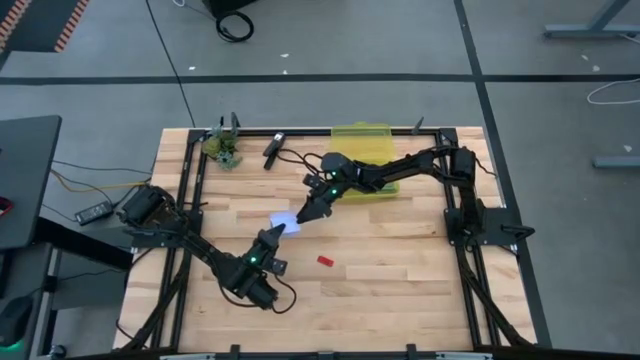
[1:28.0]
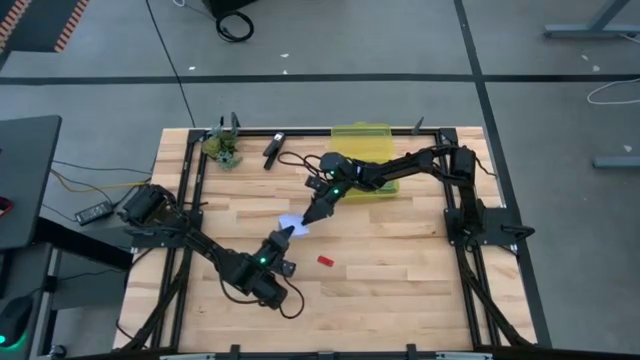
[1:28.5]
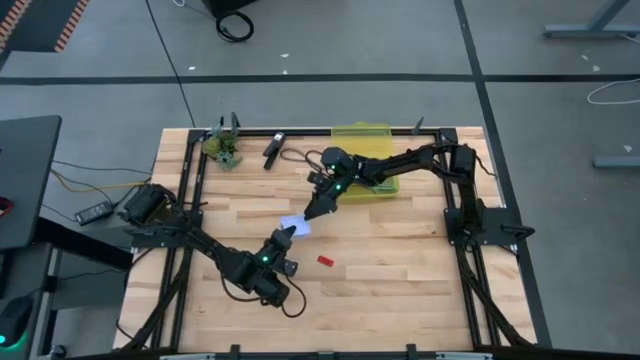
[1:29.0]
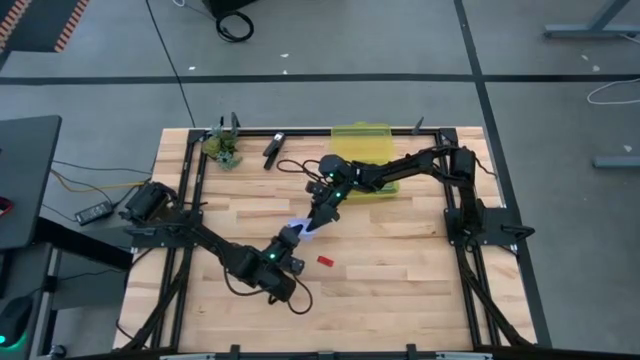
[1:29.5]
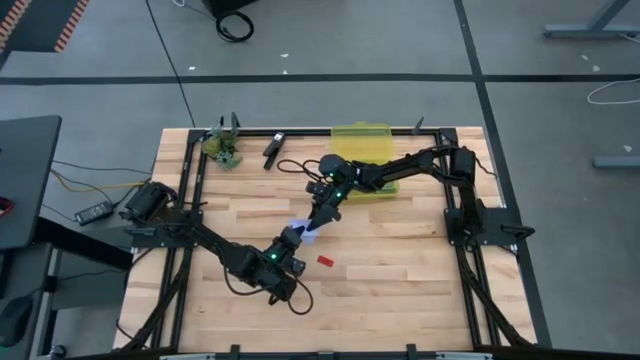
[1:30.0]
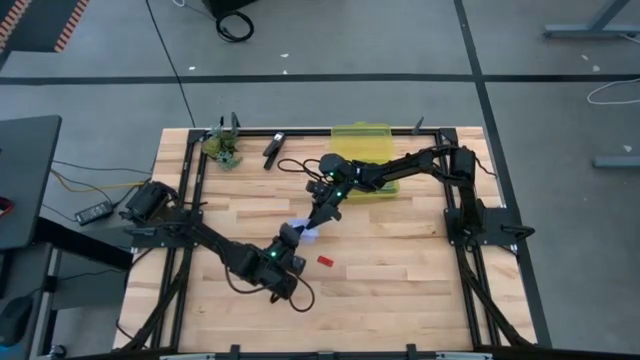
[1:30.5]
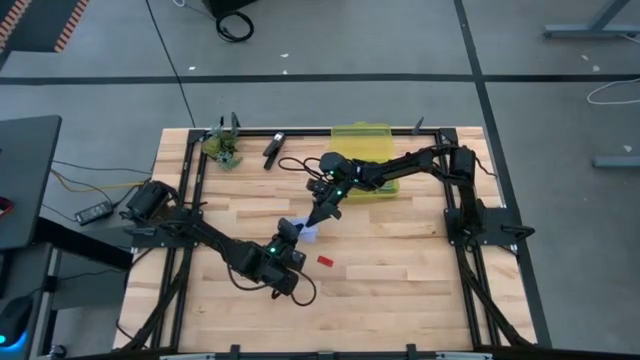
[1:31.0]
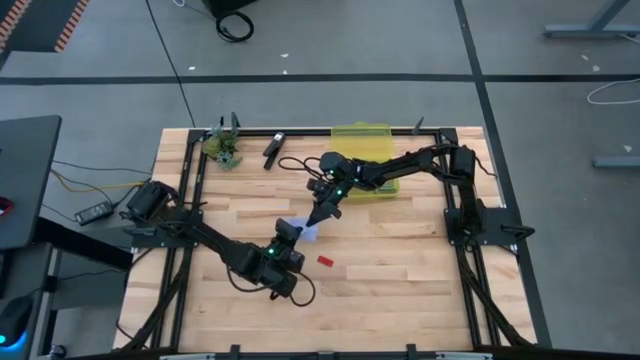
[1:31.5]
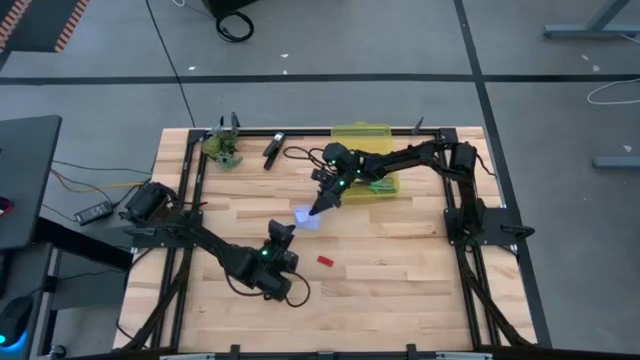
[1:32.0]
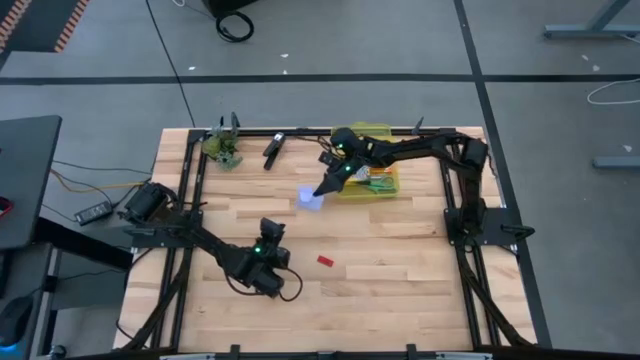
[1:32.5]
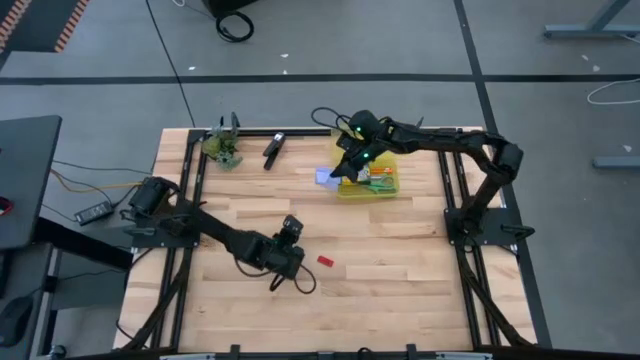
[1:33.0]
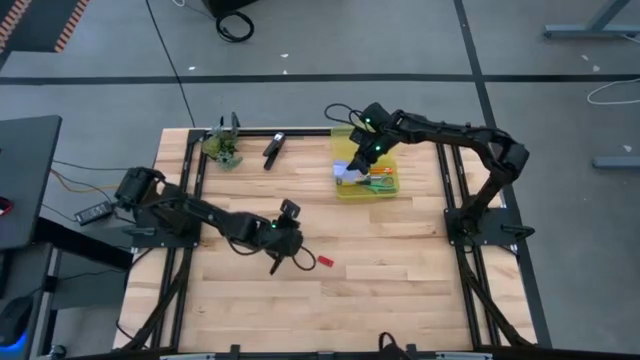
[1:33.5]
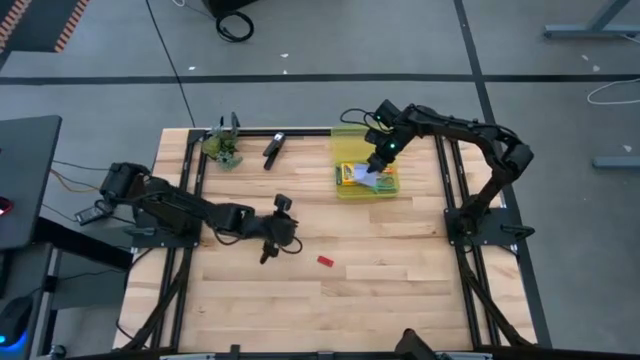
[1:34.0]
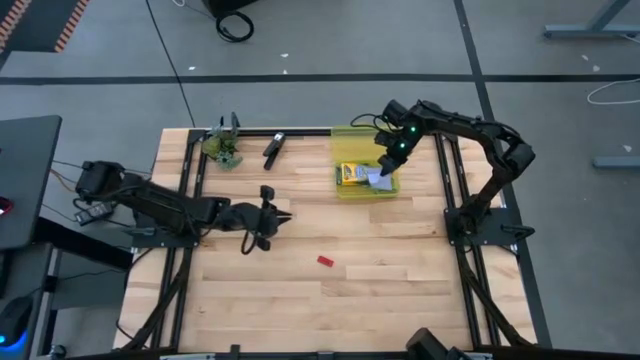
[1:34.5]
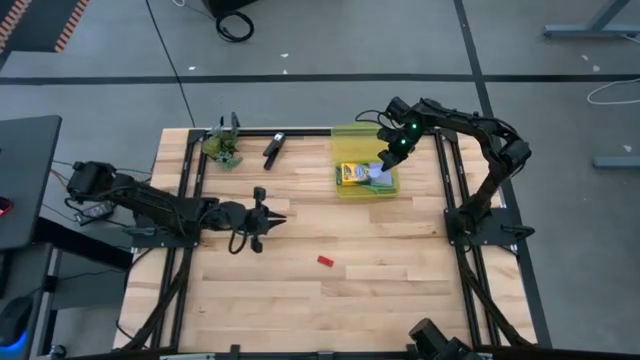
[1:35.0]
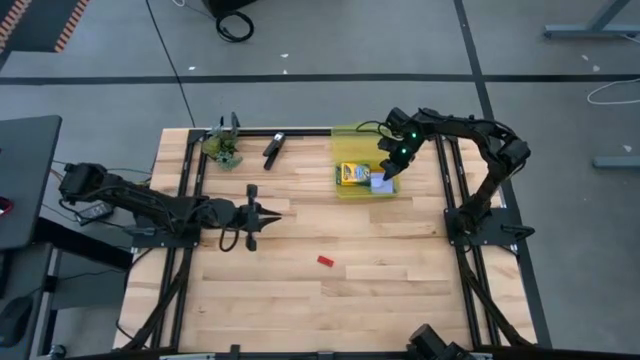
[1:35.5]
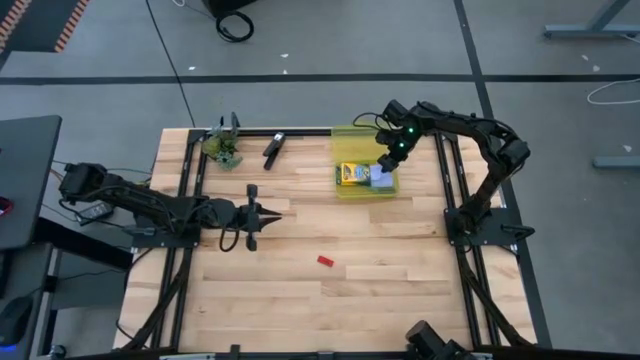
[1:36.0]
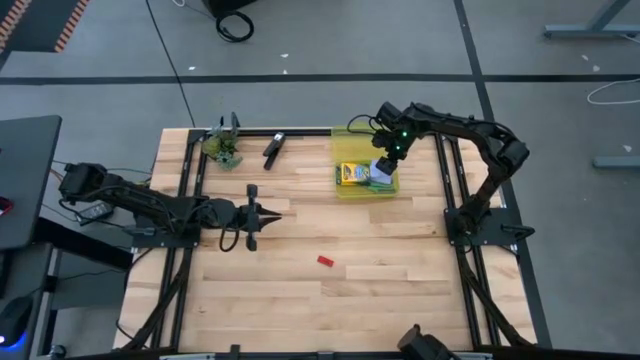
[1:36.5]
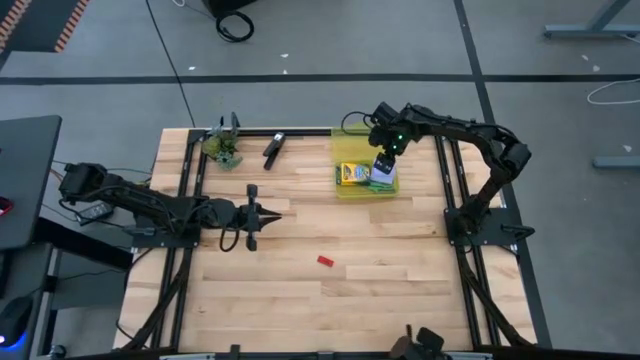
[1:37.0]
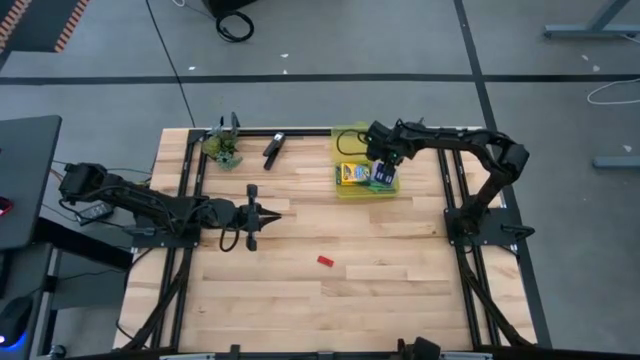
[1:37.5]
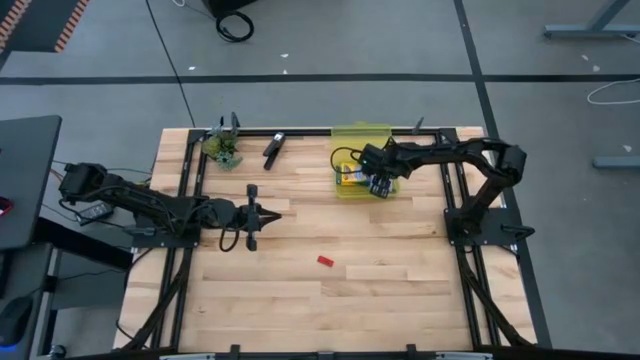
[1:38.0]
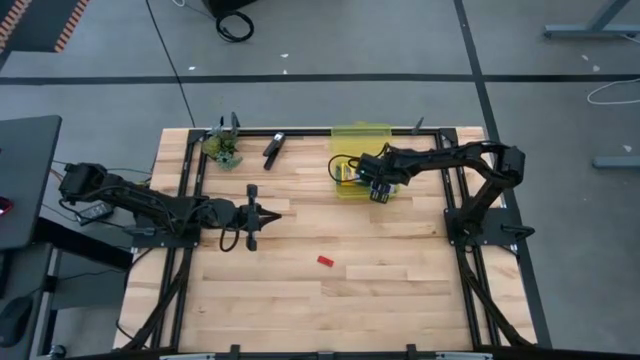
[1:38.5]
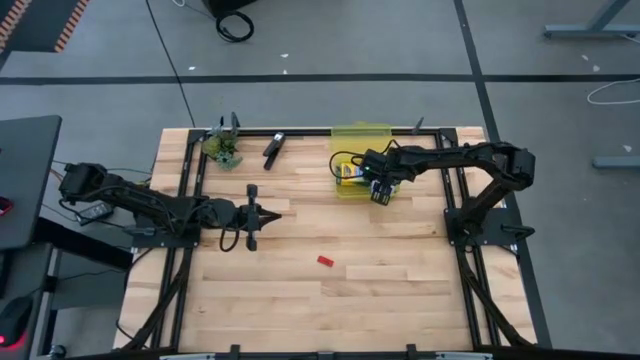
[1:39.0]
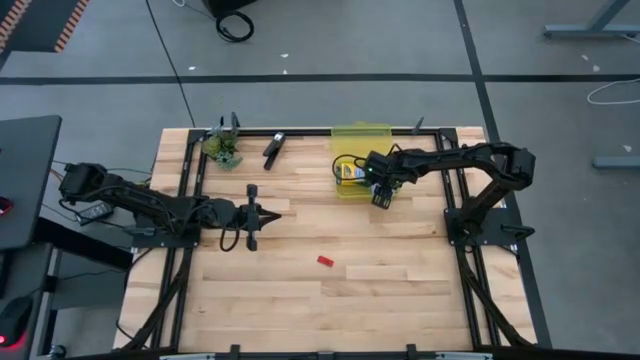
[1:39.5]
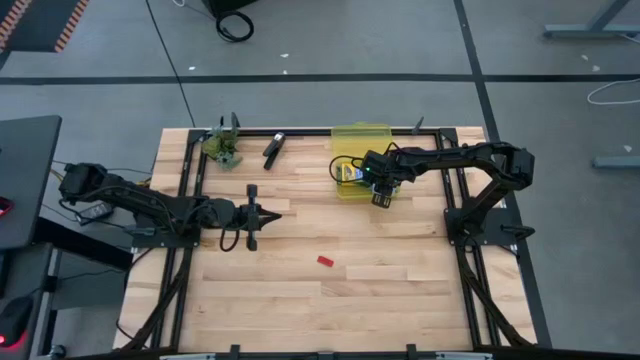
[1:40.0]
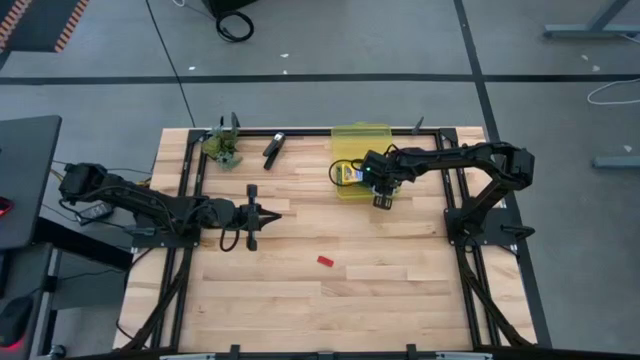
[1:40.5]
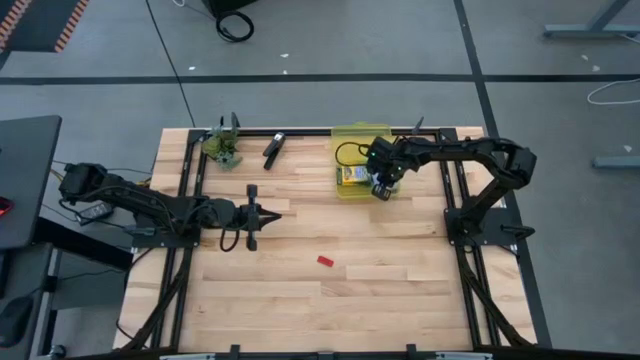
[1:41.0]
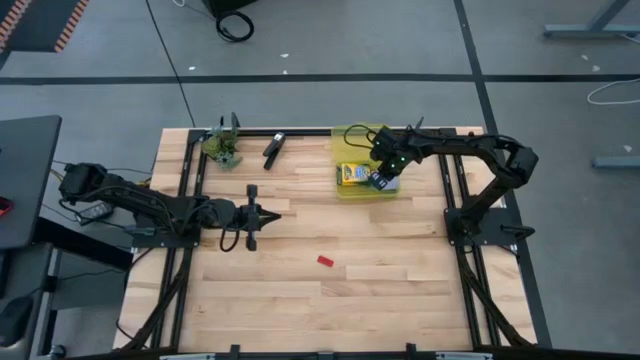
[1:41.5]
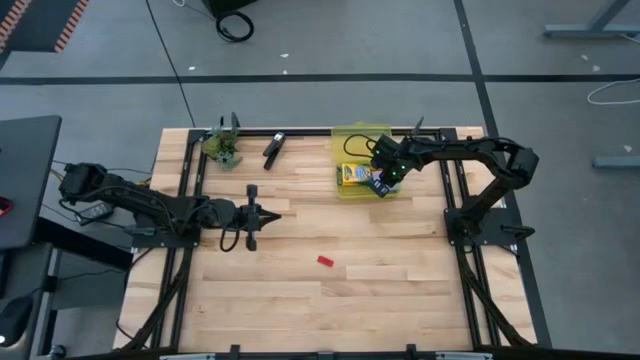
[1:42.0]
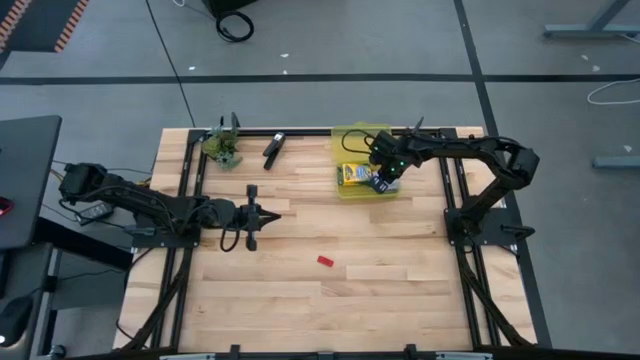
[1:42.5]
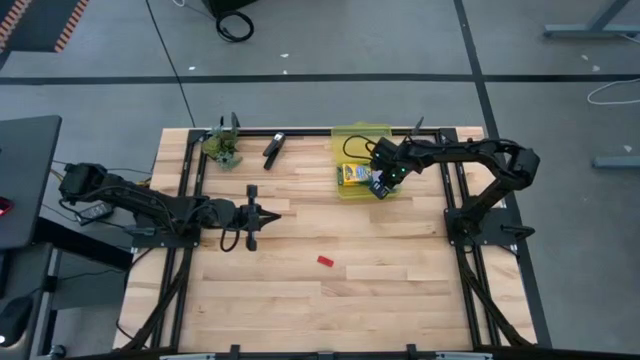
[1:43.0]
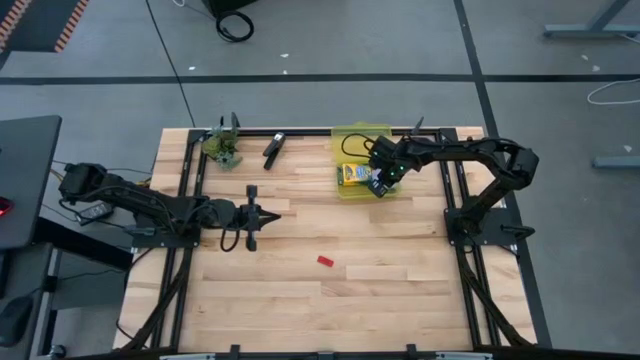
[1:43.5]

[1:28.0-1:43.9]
Task: Pack school essentials
Put the blue sticky notes into the yellow supply box

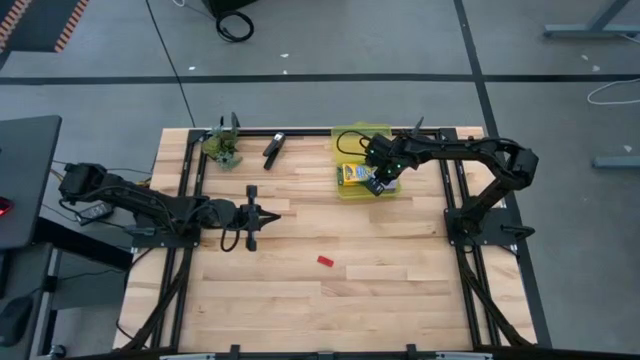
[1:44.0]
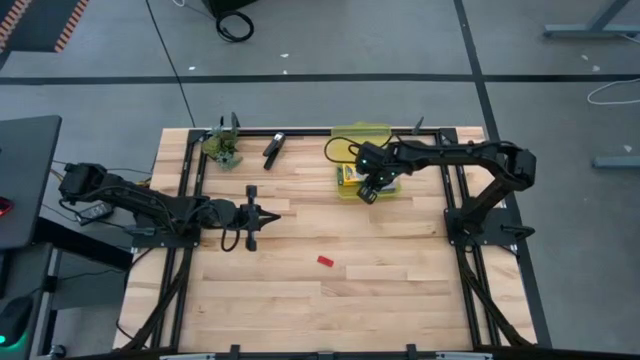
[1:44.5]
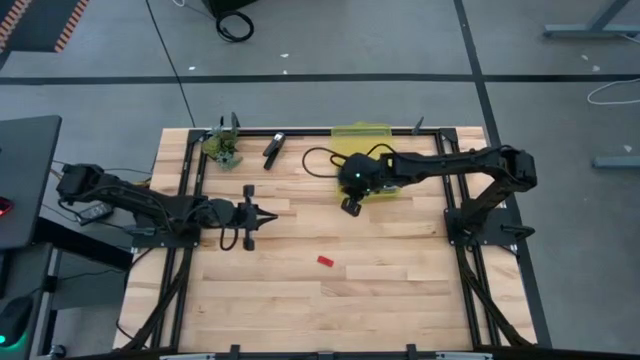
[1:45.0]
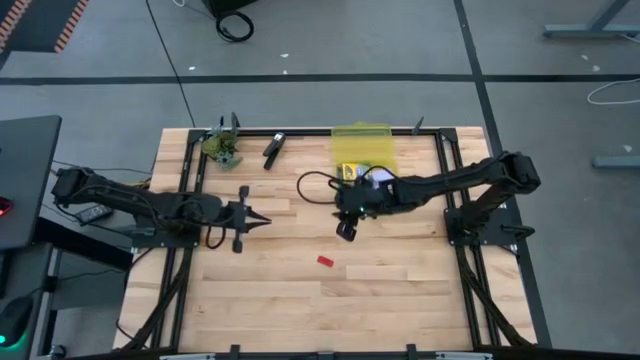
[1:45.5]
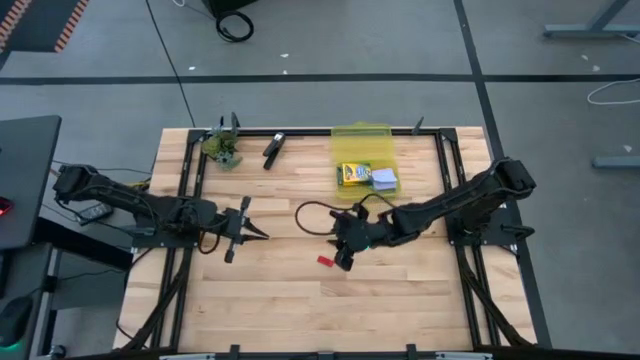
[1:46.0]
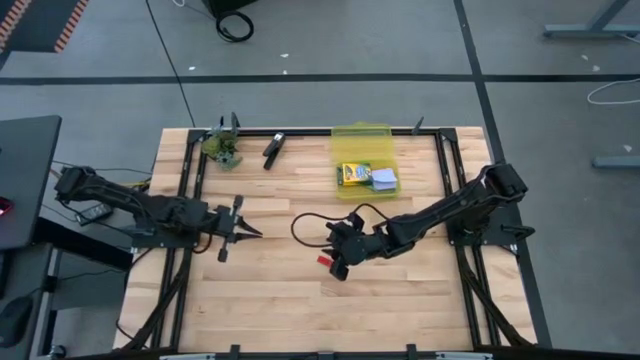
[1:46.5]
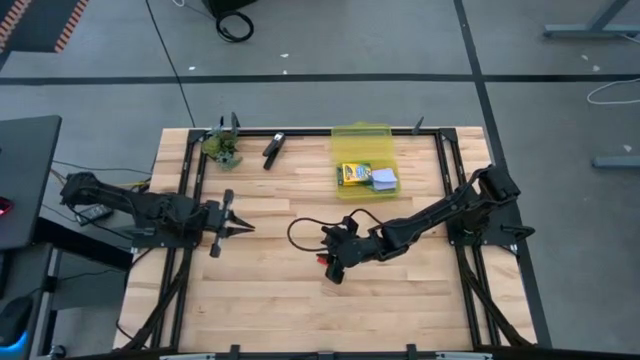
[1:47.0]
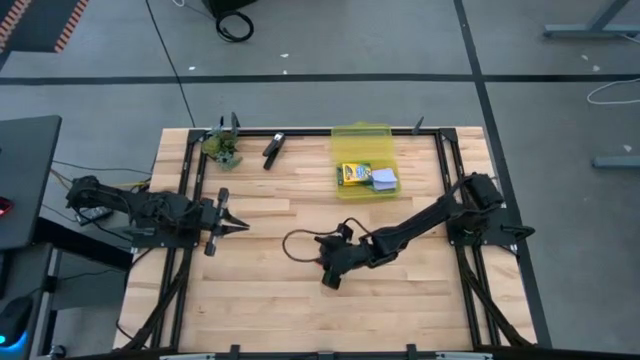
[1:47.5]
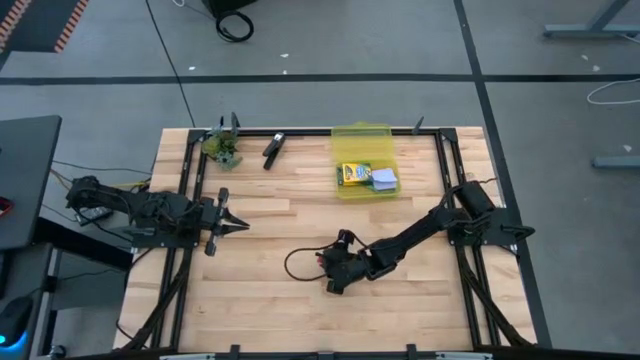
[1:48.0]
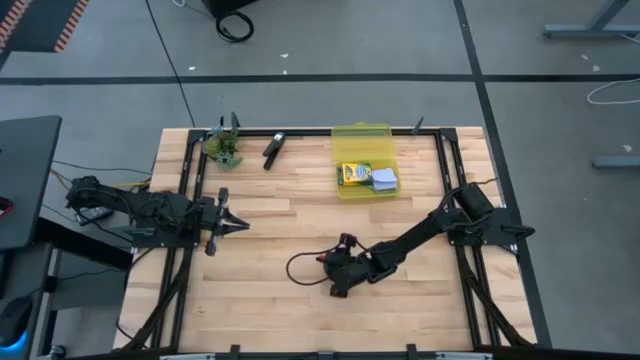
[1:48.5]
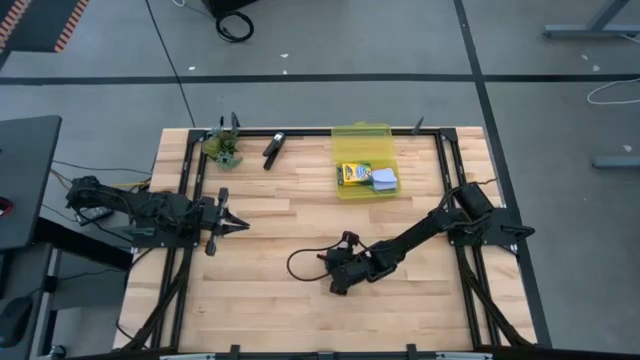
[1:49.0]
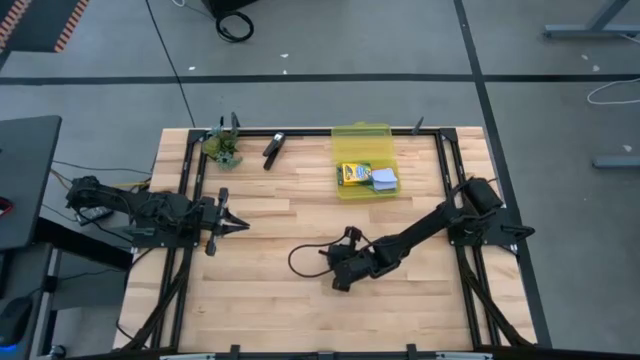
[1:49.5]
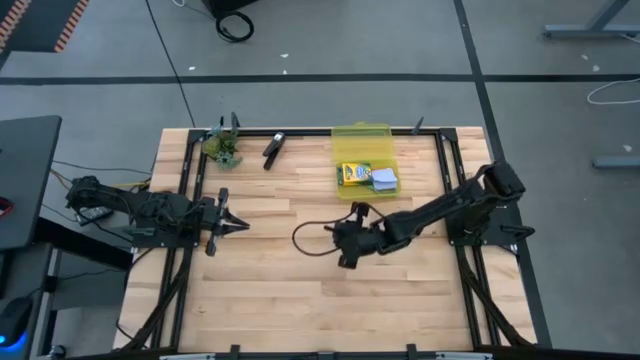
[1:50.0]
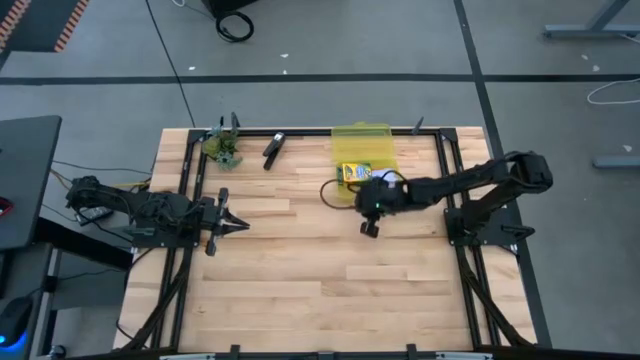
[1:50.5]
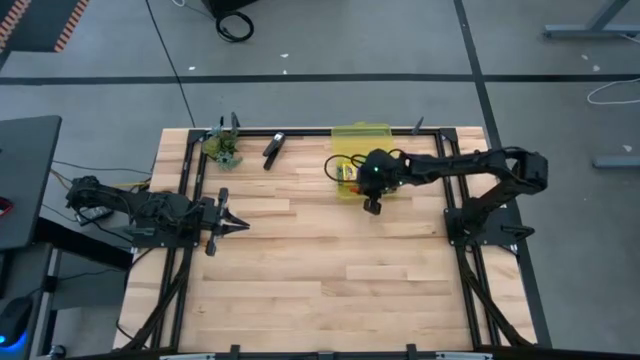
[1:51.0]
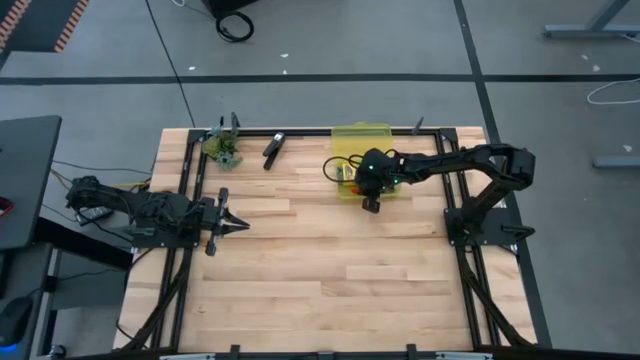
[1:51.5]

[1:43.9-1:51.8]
Put the red eraser into the yellow supply box
